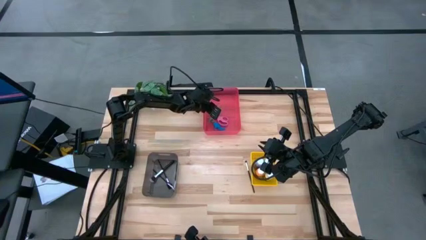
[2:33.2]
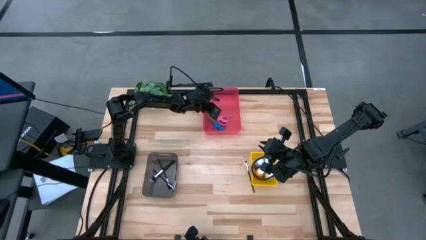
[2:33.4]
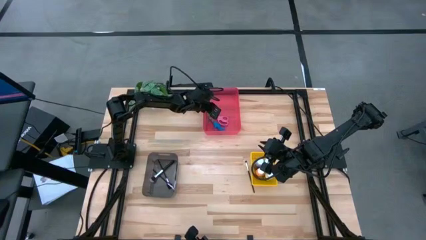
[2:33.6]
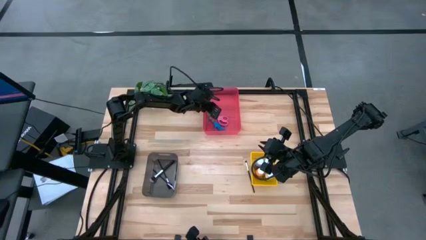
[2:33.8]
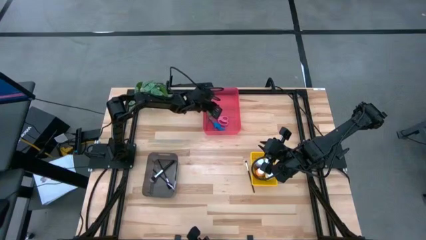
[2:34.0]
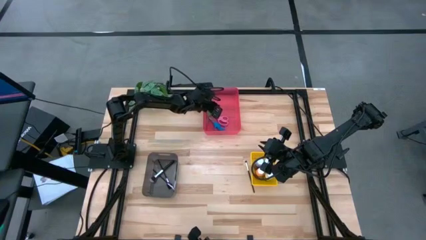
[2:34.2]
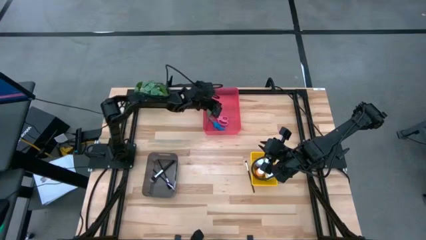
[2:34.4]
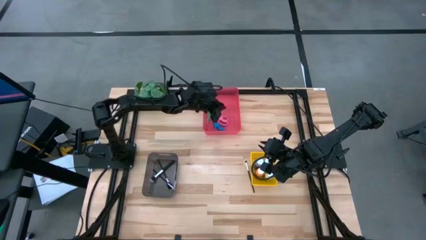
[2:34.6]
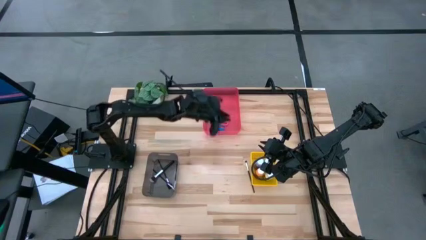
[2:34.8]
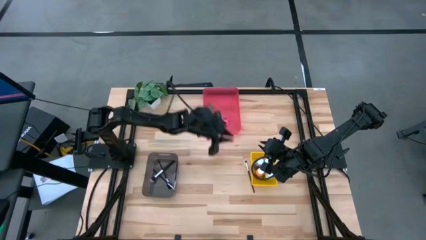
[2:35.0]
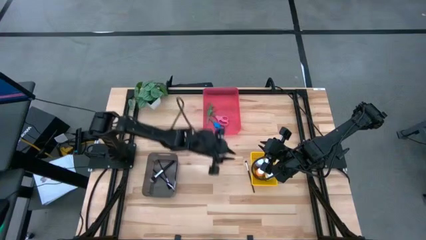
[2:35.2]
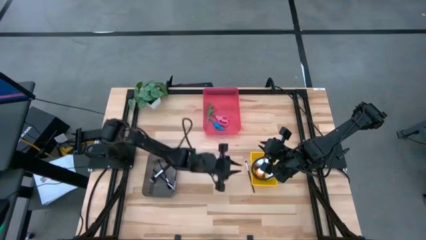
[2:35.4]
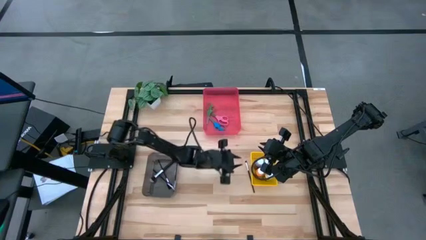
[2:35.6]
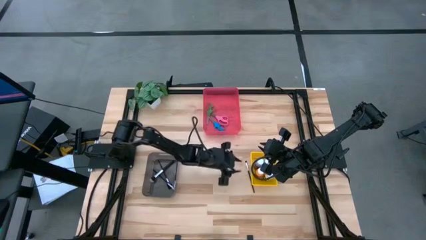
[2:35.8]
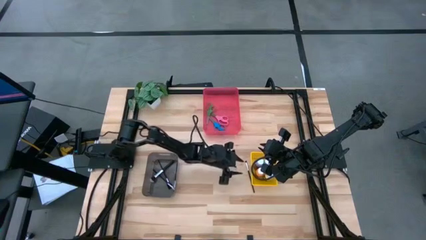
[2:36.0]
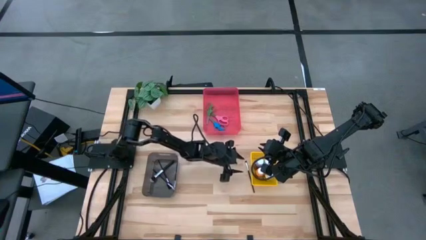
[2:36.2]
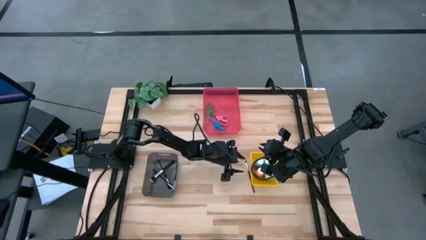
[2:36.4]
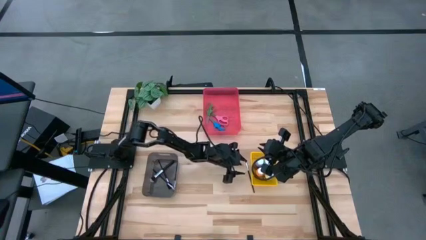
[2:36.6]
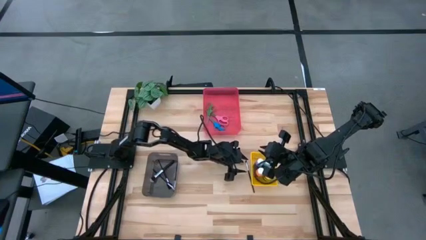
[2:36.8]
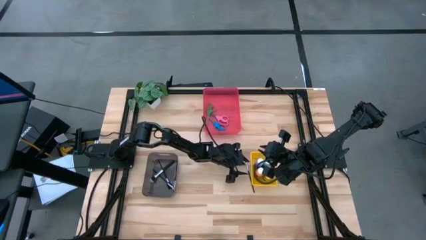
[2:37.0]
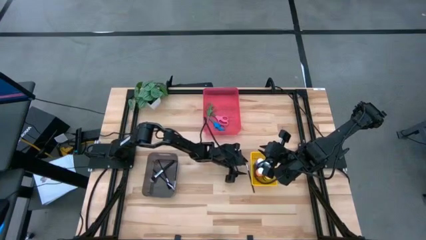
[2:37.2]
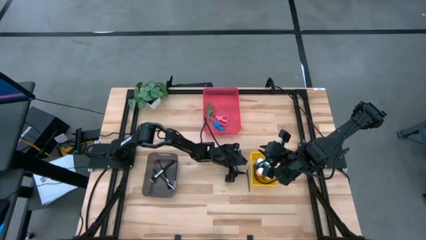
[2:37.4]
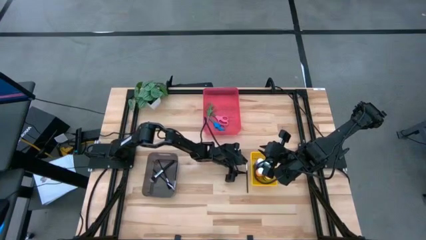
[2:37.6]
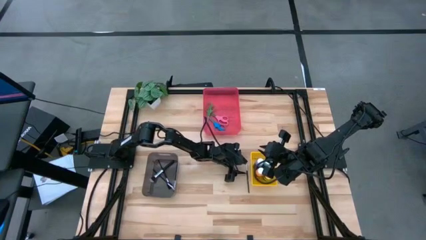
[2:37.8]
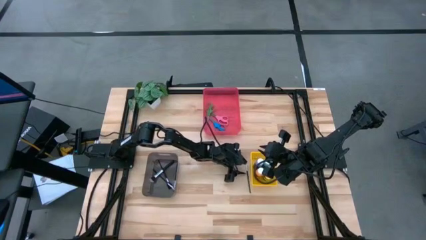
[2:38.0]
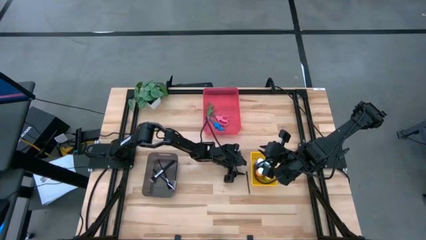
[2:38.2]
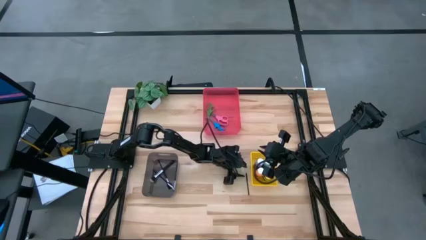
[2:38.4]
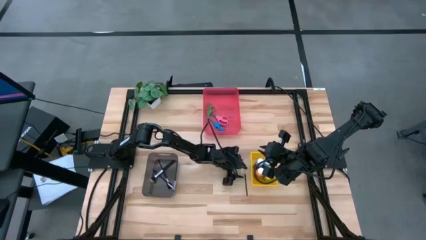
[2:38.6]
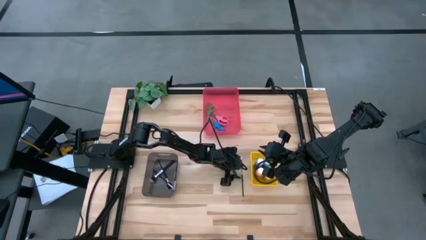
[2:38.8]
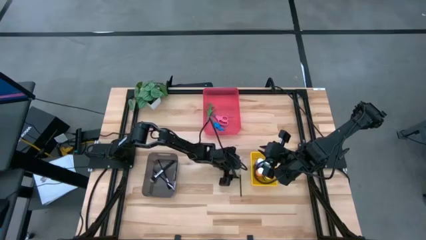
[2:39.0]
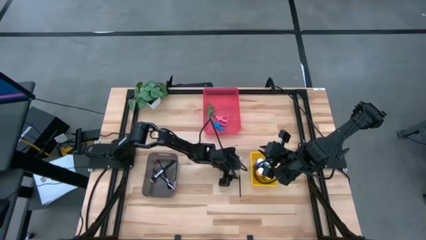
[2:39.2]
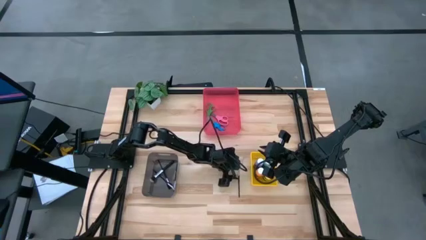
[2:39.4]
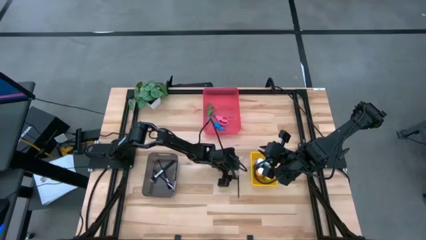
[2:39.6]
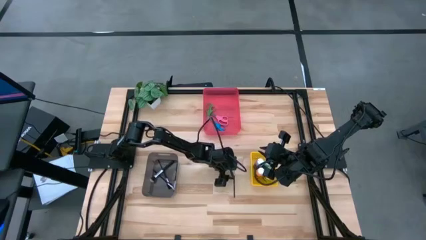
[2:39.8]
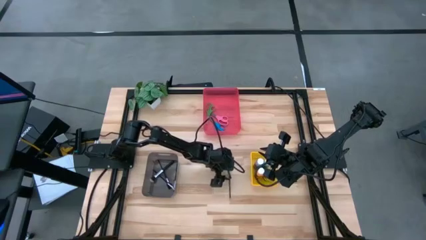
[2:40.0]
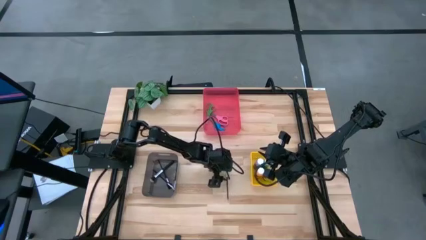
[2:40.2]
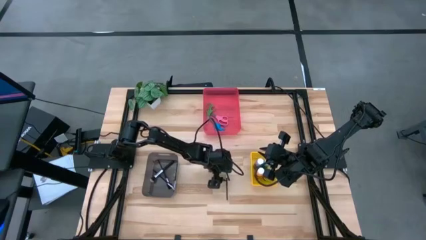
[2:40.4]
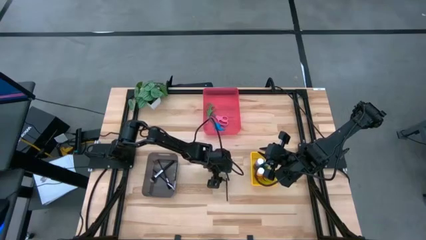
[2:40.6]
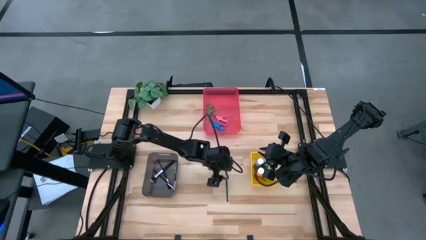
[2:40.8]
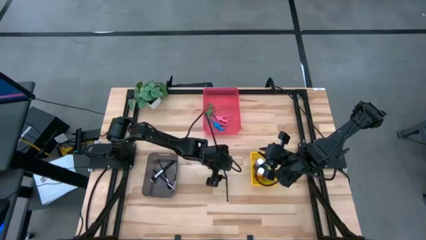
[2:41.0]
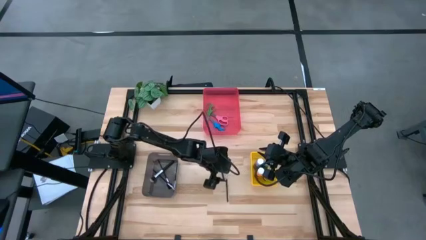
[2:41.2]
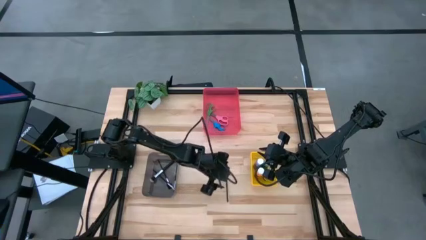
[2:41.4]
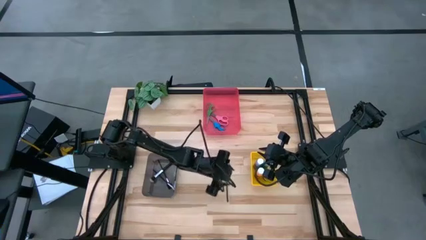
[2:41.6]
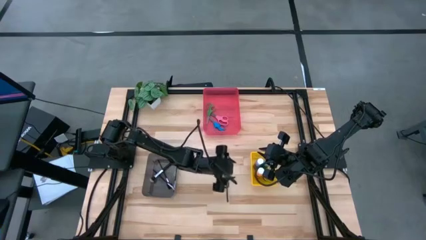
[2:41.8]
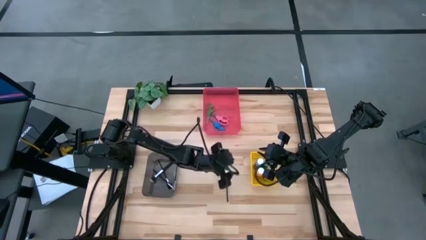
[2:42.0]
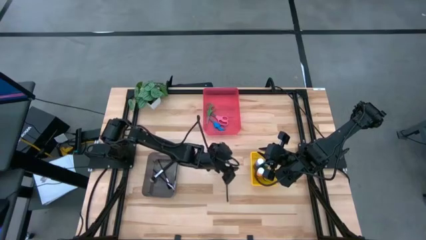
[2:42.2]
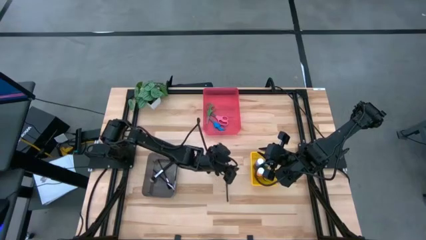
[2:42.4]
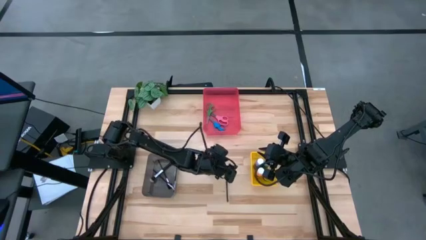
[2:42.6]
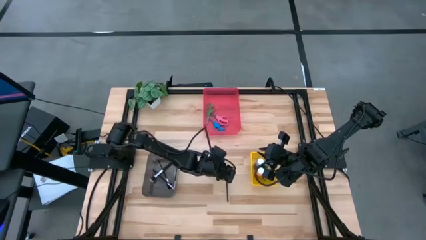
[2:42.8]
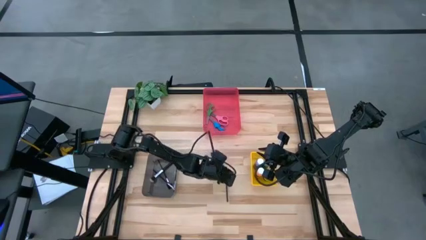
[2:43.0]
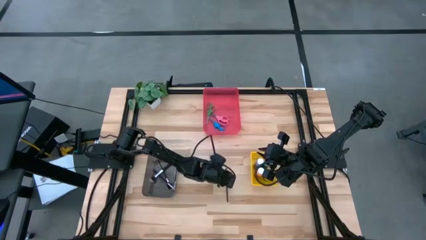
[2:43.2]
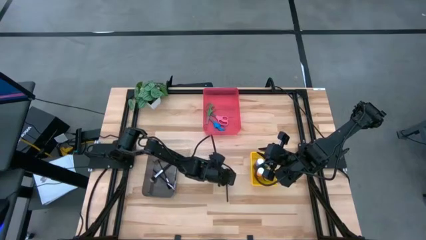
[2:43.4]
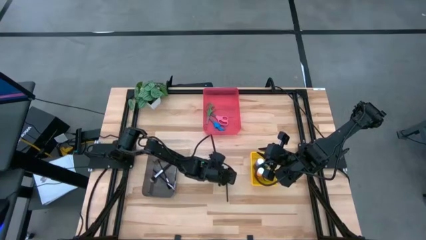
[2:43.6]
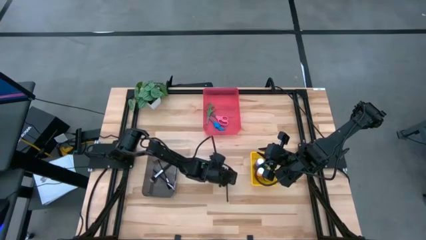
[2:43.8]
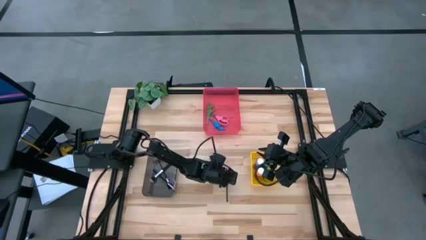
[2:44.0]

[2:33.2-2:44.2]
Task: Pick & Place Paint Supplies
Put the black makeup brush into the black bin

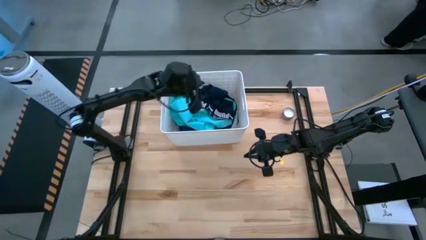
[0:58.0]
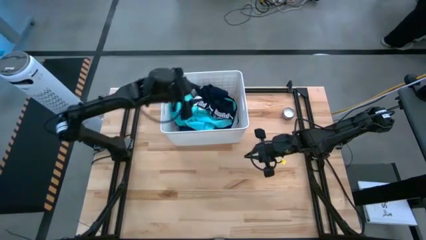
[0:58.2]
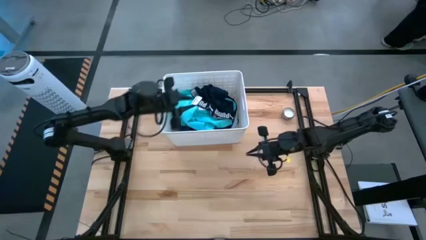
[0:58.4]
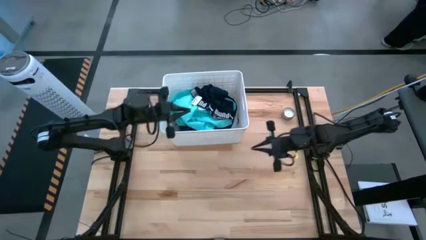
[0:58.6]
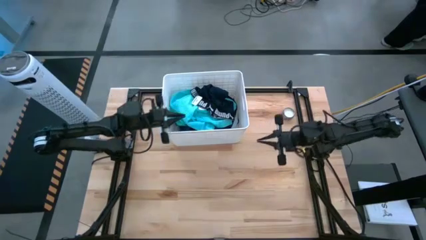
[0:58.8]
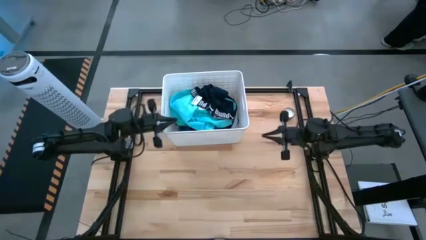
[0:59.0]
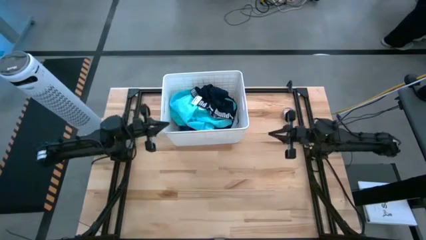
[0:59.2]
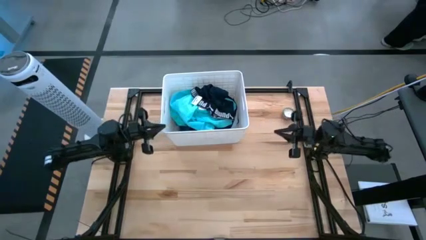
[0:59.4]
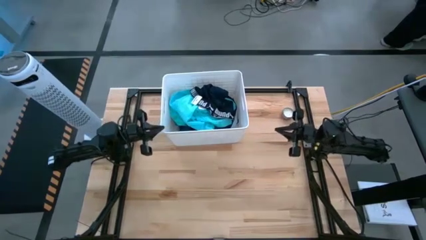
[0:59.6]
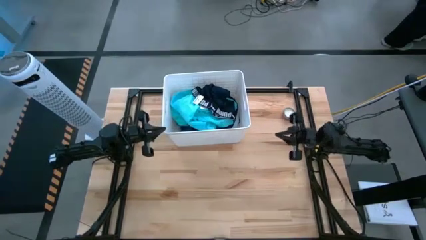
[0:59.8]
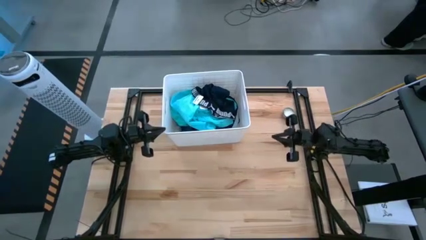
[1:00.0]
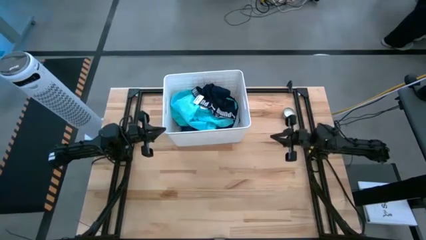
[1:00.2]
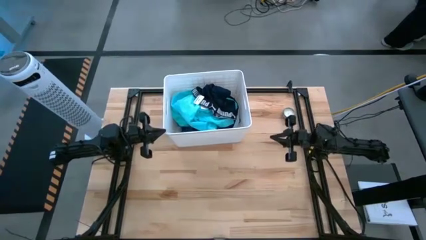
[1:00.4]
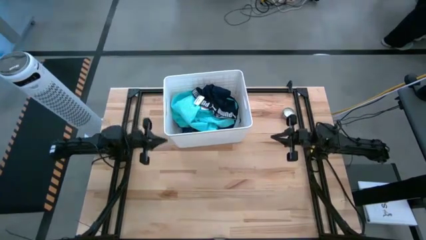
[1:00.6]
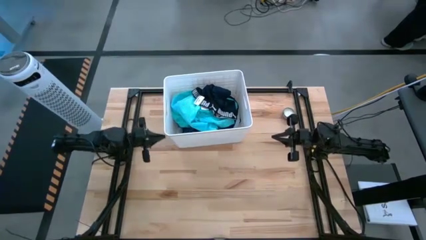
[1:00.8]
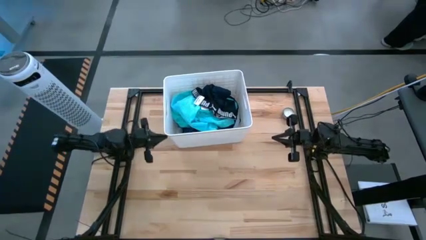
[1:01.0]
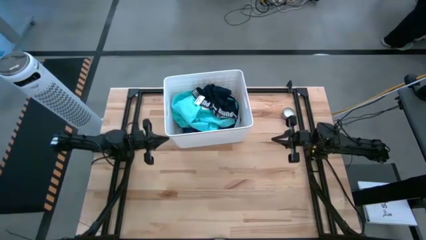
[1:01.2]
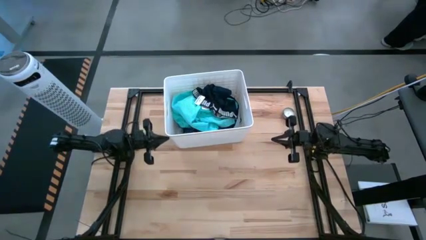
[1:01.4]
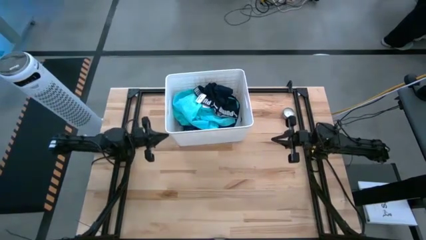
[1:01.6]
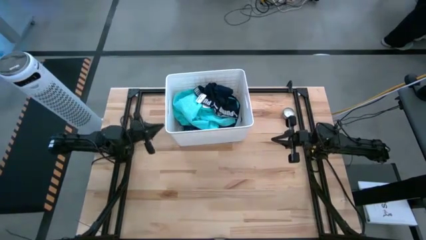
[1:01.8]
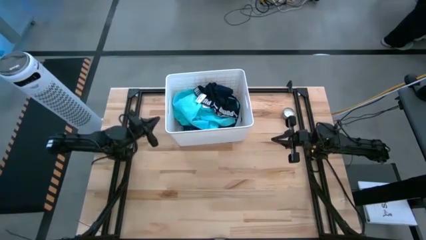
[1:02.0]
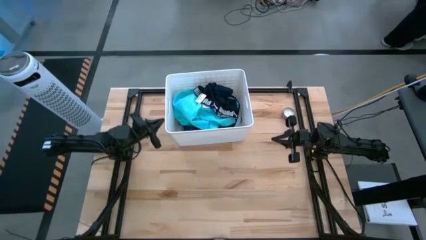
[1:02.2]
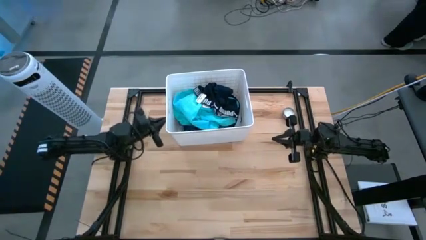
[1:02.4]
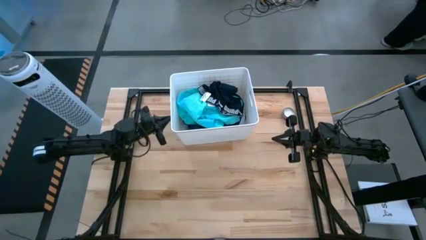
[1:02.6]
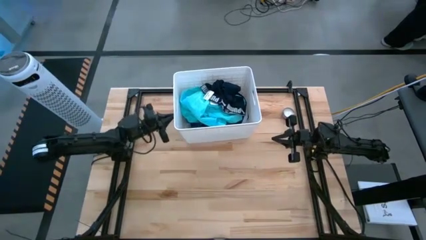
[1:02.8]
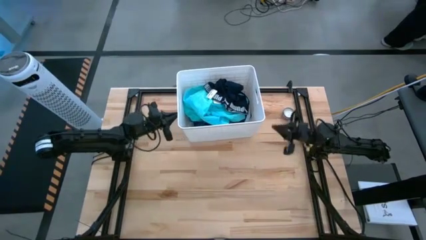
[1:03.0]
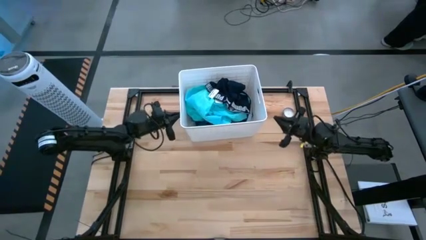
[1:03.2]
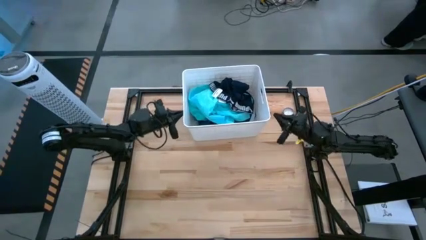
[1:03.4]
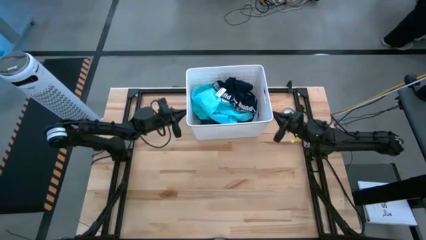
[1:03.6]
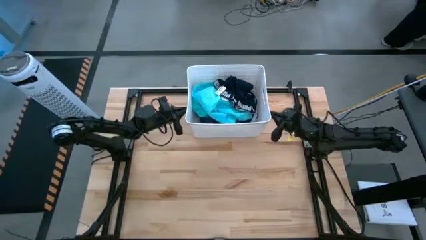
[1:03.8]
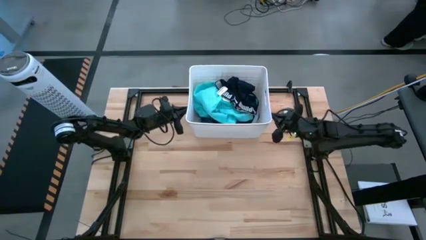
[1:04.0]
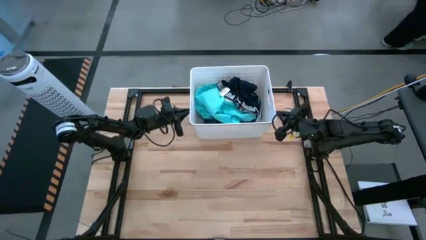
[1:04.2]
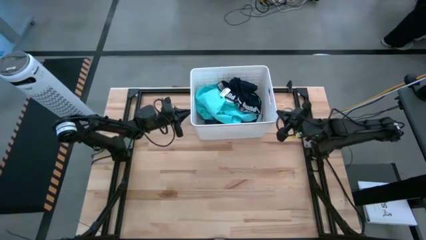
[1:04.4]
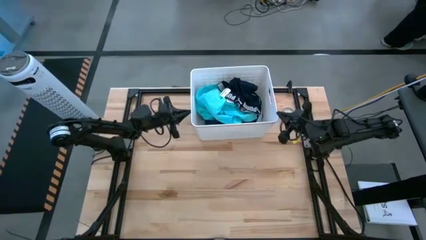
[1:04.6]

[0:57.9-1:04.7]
Task: Sort clothes
Adjust the white bin
